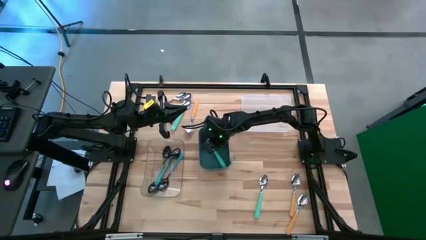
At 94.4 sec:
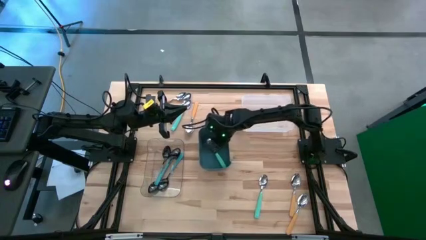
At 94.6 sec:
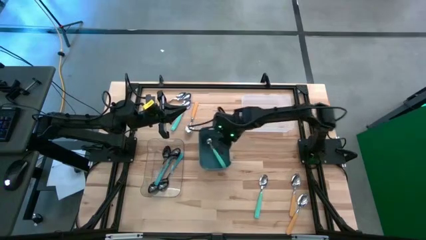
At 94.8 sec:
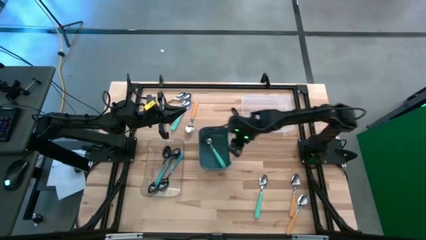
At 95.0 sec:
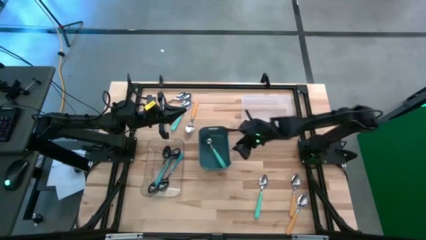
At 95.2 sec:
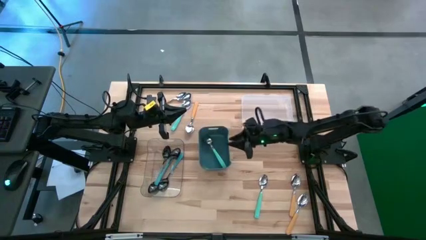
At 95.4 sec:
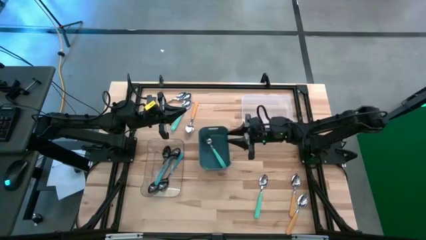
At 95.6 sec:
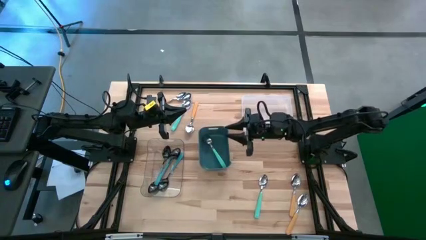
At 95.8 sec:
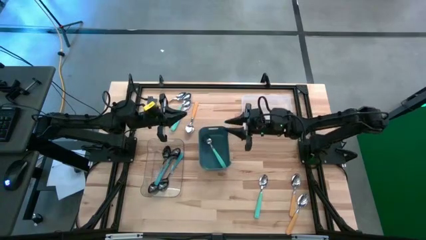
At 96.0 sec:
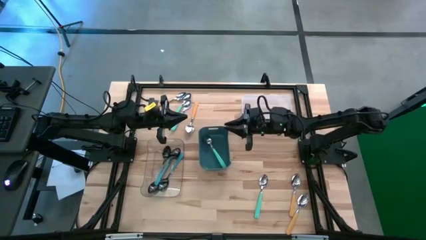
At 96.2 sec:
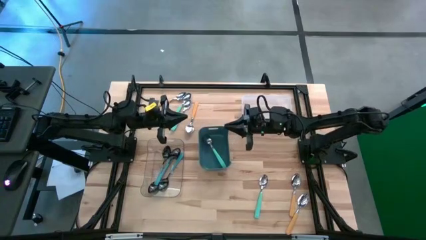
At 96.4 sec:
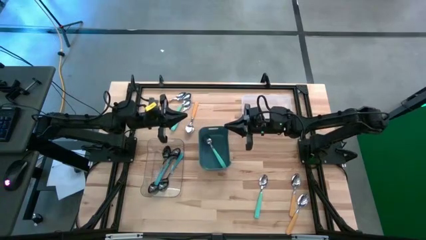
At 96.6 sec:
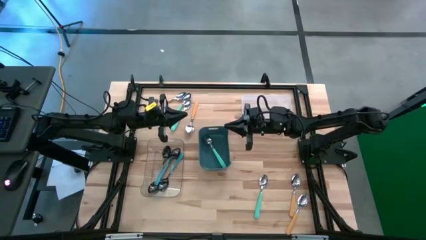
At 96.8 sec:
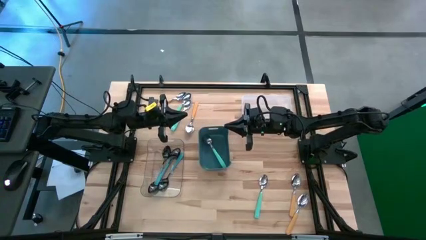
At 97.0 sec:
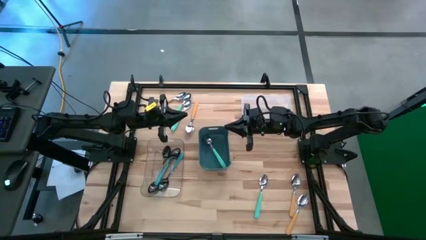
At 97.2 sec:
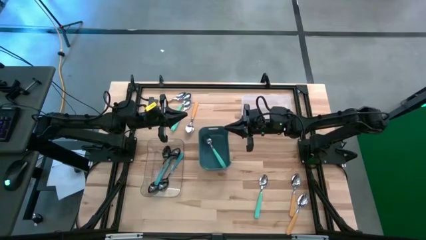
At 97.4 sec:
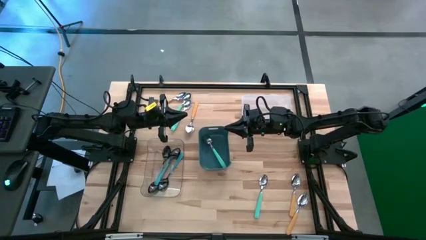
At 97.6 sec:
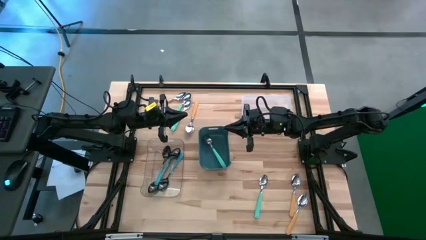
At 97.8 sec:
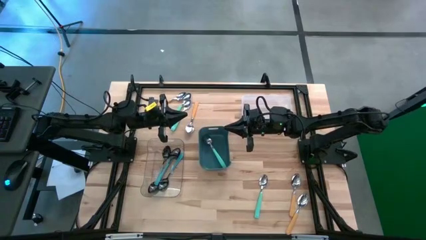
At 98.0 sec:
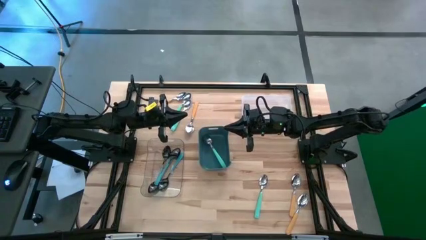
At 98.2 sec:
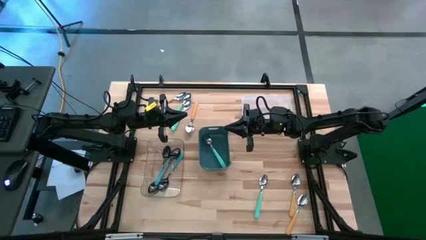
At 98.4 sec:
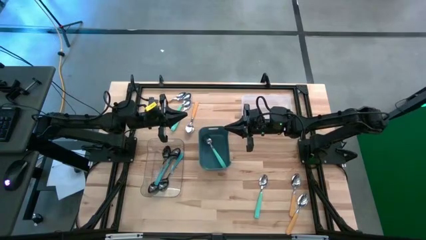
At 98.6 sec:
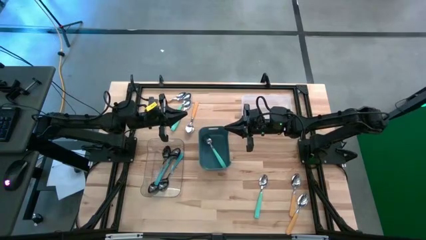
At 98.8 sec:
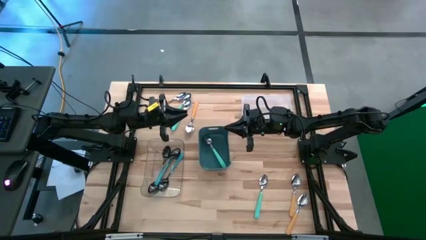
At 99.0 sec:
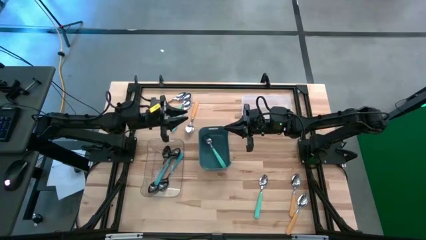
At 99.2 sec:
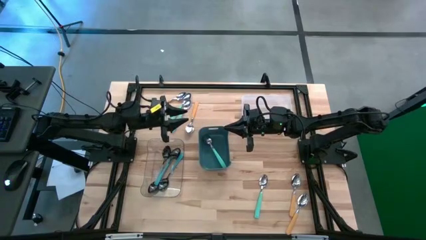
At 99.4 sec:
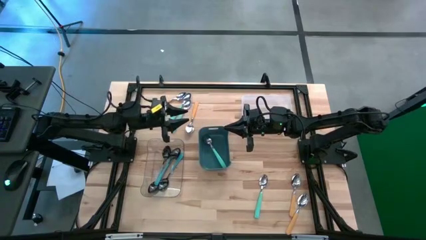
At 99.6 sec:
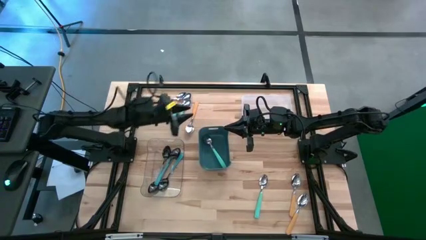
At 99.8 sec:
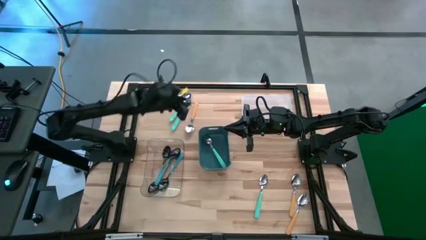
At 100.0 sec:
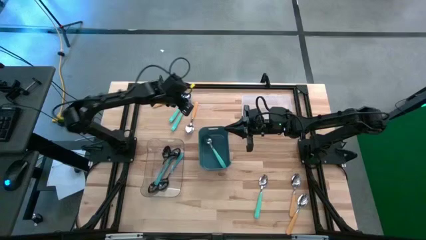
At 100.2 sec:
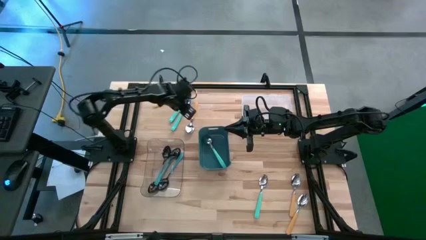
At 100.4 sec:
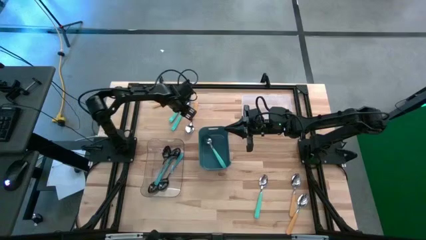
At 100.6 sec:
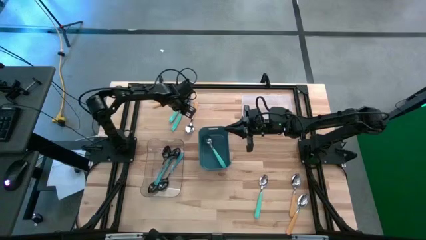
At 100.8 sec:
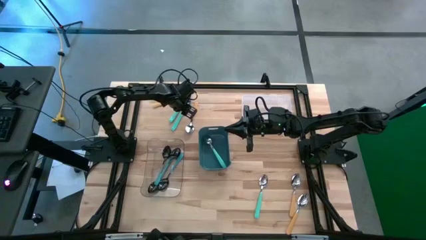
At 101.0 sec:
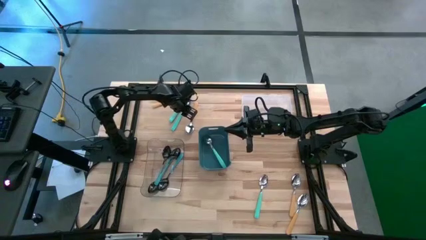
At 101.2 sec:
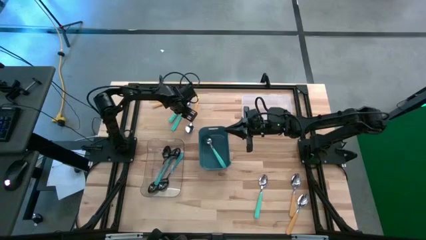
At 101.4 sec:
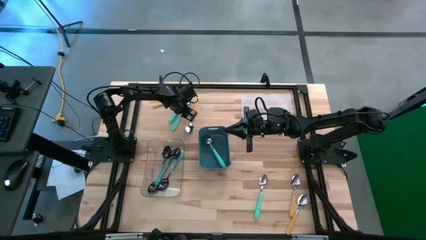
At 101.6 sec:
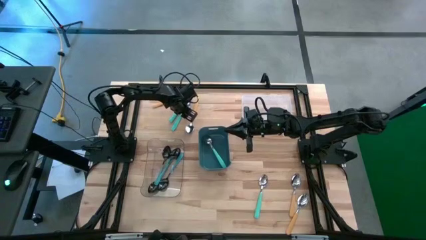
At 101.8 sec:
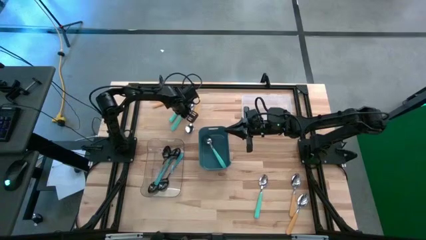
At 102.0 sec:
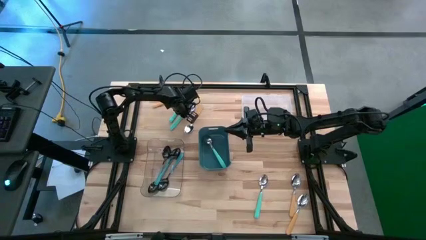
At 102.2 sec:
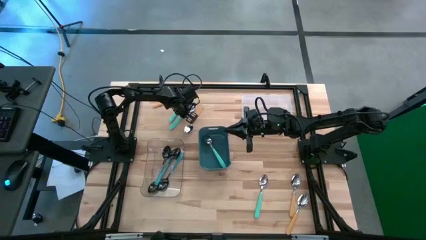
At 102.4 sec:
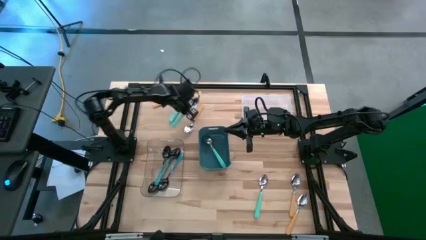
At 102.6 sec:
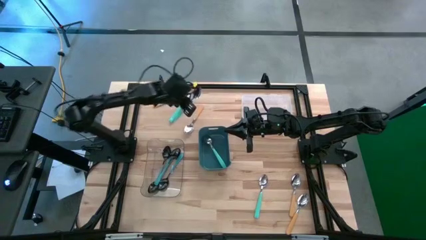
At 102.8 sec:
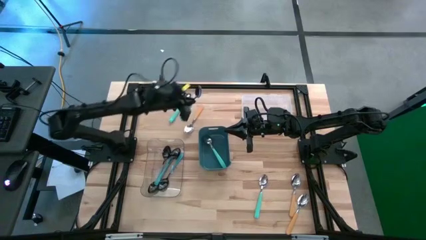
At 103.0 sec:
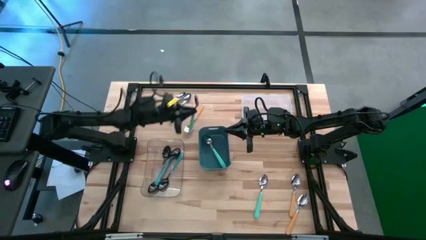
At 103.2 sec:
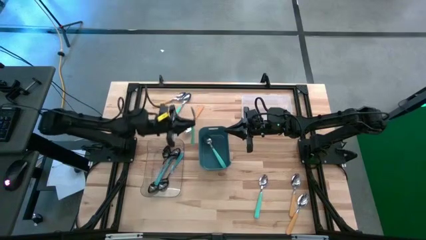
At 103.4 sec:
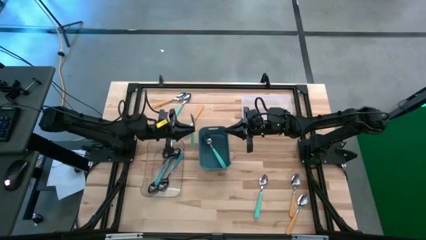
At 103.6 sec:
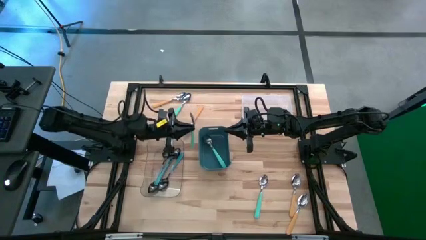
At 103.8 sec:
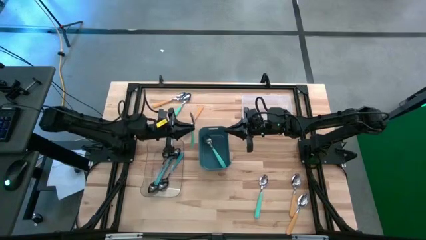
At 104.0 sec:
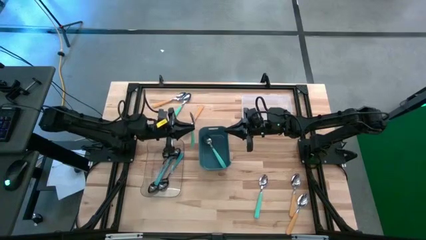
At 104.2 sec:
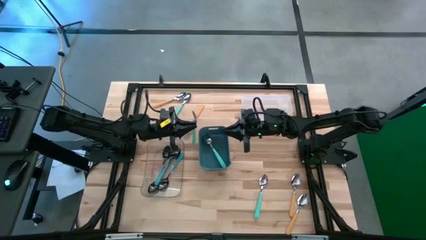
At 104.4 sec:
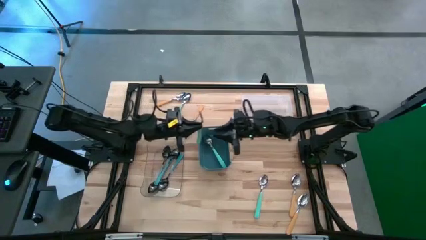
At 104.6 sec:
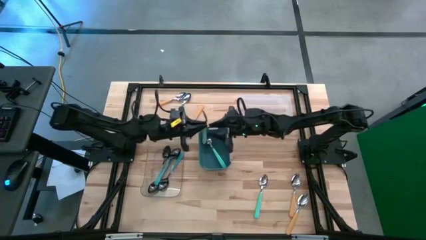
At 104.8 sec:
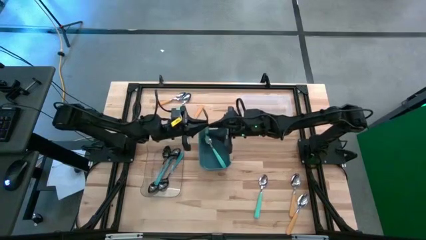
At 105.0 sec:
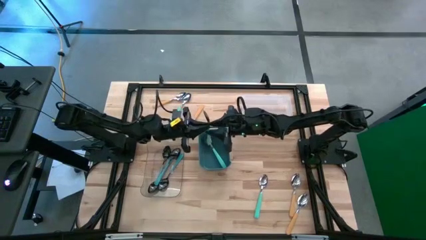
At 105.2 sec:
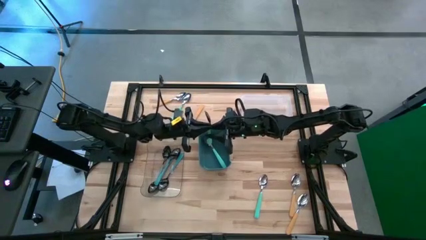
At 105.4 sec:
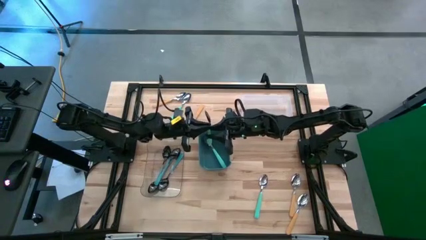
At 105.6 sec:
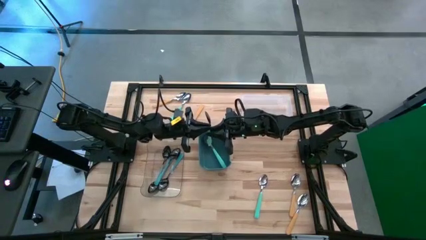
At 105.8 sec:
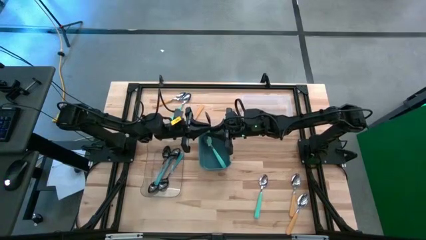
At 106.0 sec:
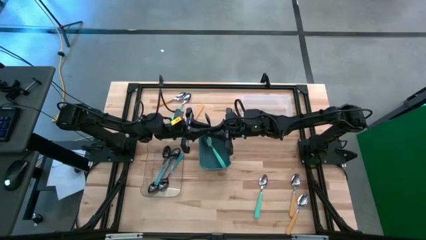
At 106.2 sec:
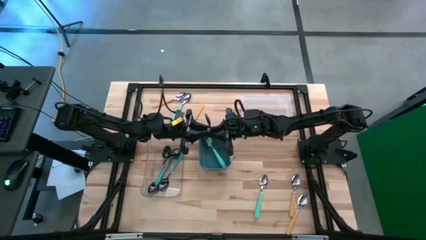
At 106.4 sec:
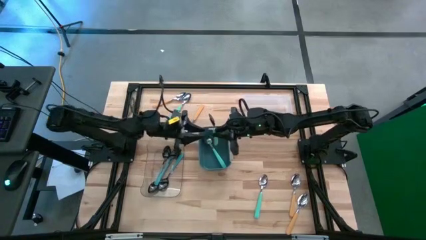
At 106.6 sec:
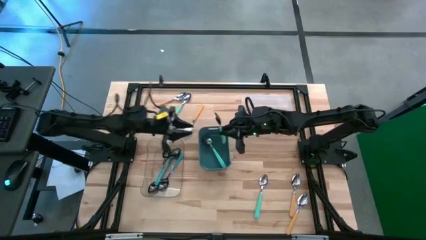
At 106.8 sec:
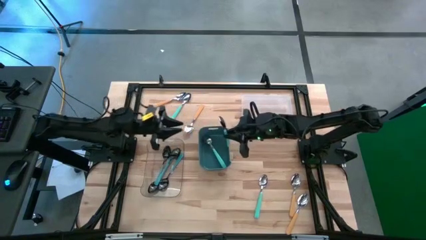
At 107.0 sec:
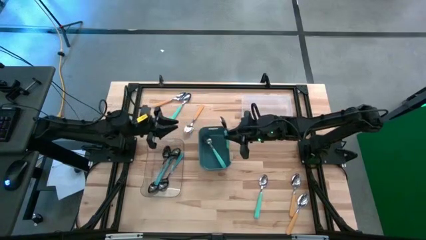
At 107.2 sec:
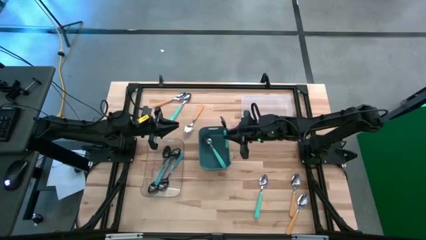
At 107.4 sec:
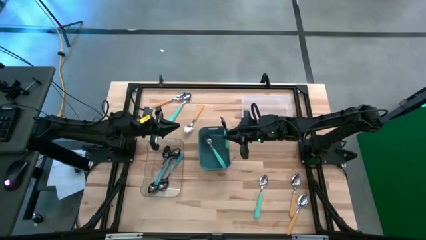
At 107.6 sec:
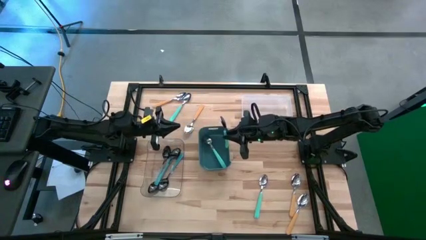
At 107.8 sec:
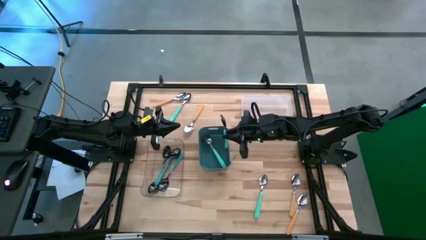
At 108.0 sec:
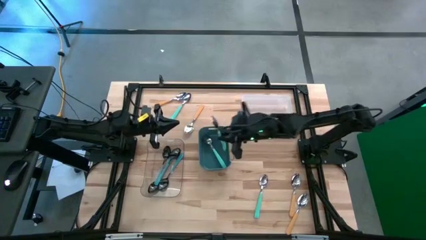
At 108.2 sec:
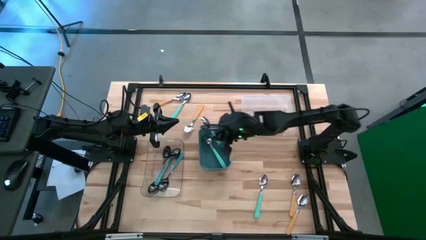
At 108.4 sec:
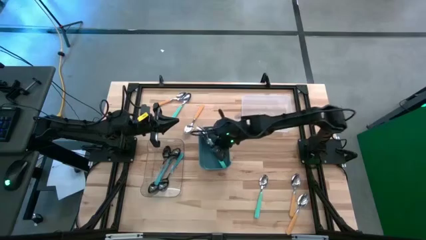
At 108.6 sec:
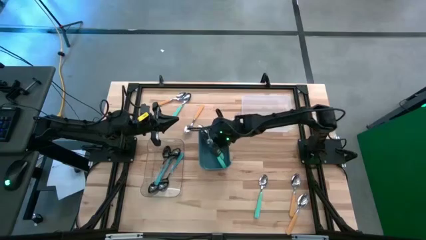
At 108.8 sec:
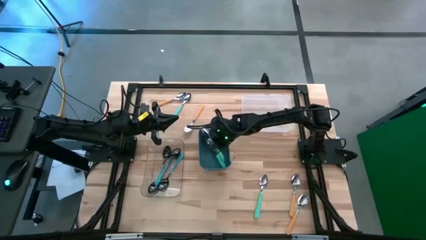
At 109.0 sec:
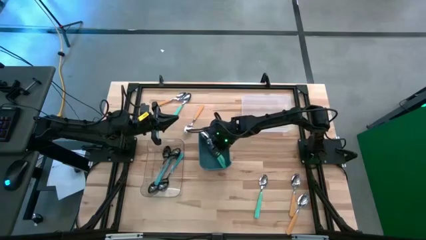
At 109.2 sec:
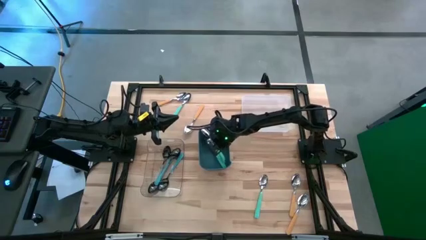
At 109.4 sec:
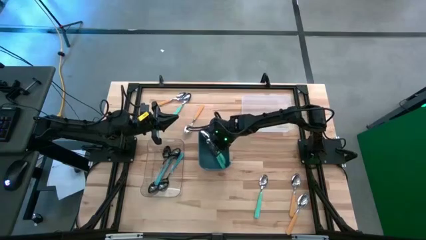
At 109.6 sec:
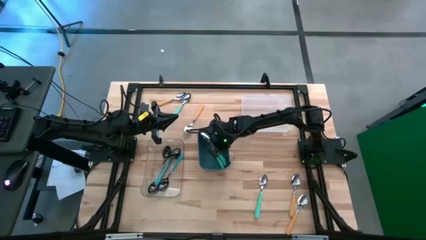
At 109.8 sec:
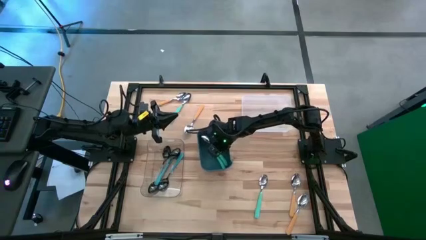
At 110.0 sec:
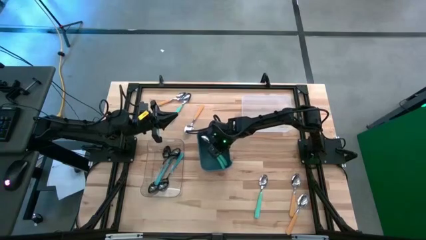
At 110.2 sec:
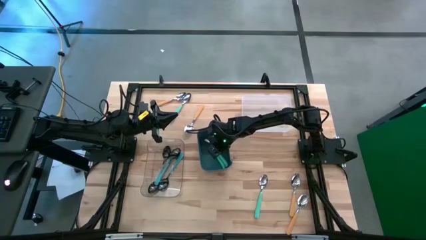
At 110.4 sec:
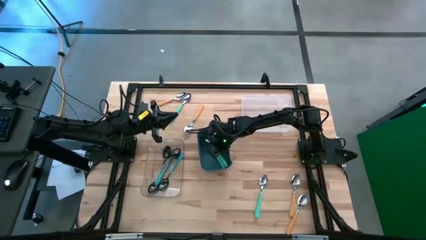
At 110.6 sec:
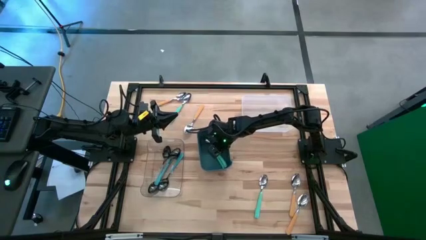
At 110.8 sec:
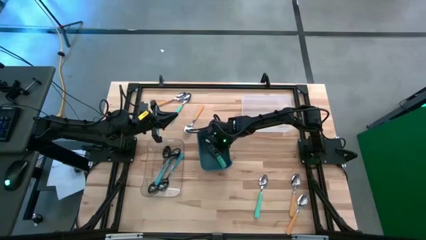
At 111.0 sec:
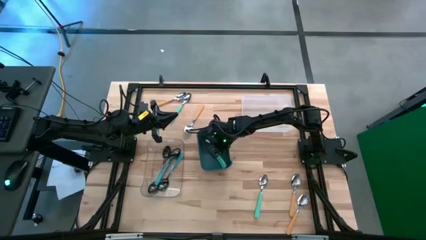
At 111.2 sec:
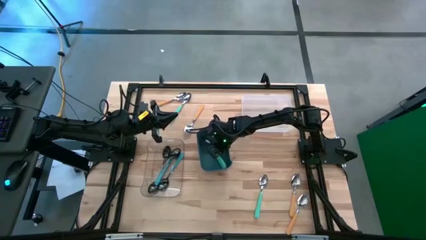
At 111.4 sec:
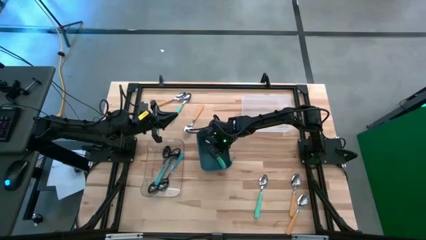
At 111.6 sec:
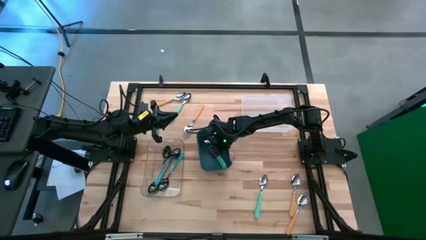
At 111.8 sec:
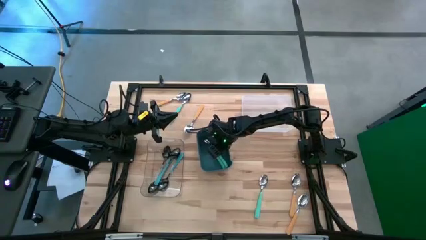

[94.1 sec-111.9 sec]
Task: Sort silverware by color (type)
Put the light blue spoon into the blue bin
